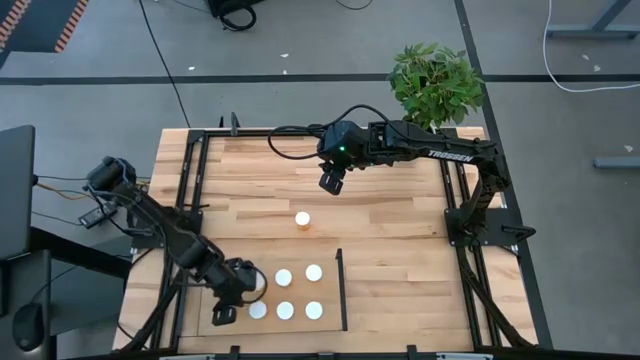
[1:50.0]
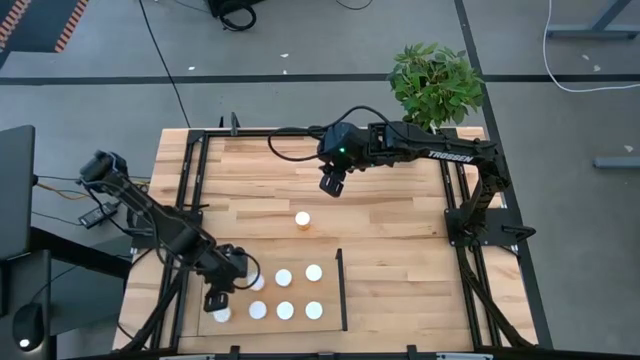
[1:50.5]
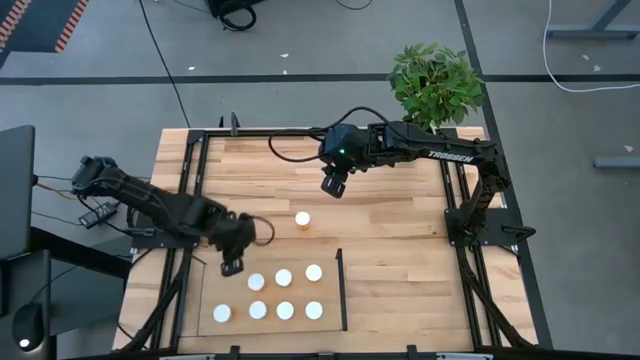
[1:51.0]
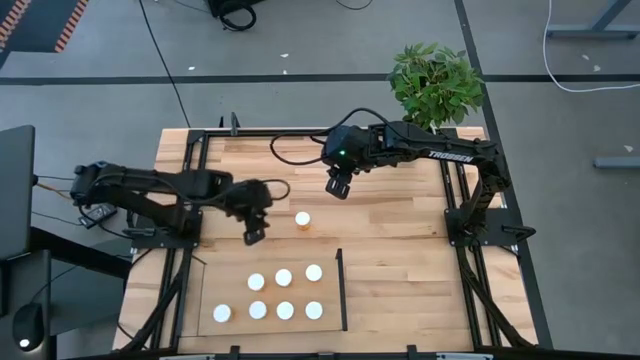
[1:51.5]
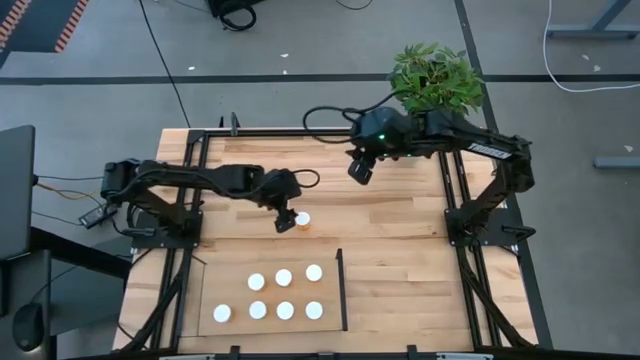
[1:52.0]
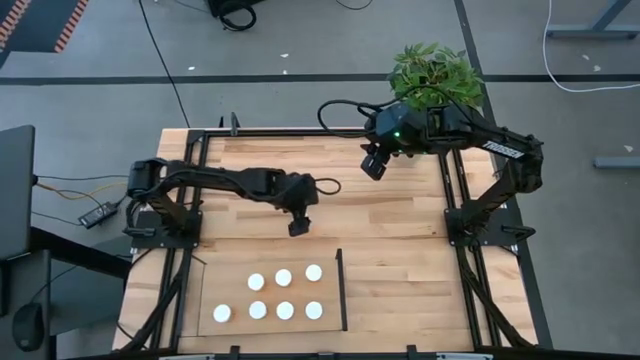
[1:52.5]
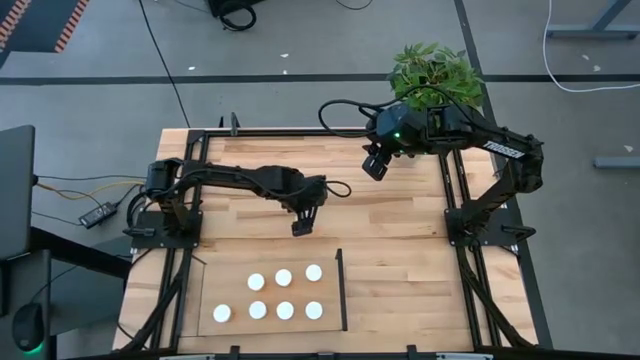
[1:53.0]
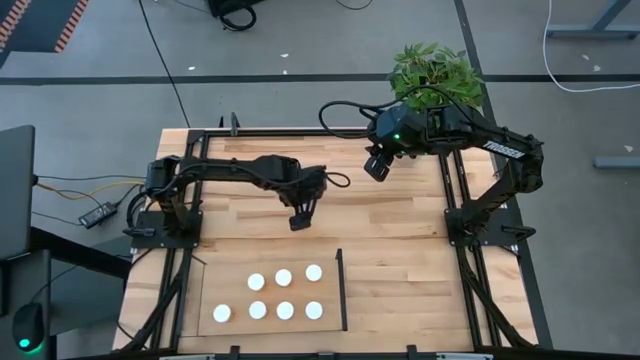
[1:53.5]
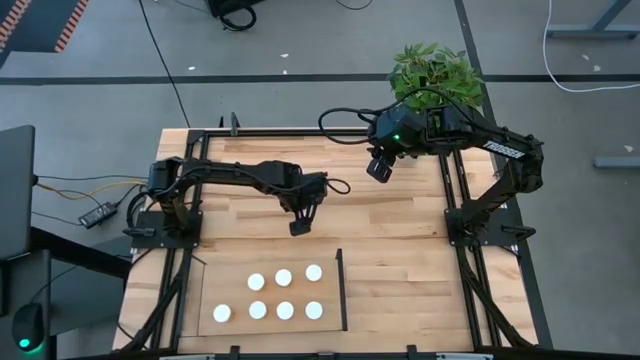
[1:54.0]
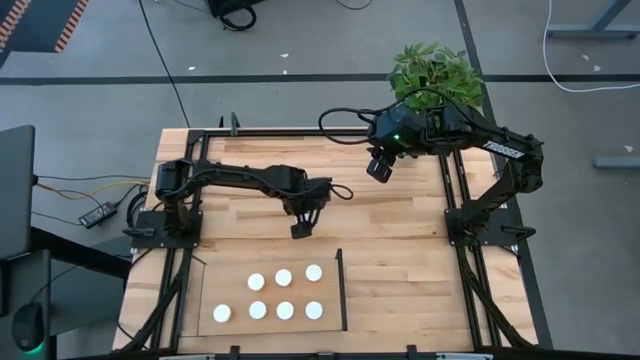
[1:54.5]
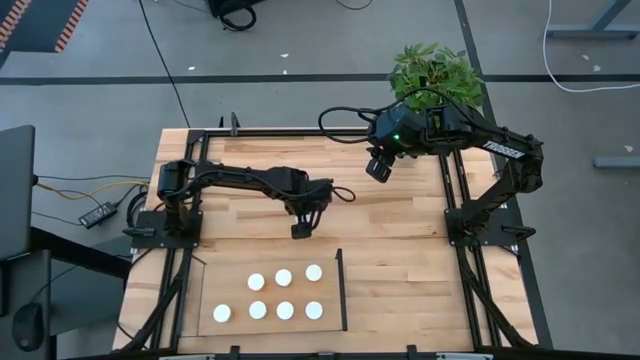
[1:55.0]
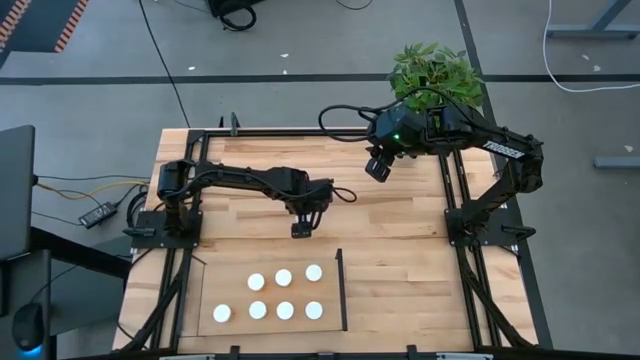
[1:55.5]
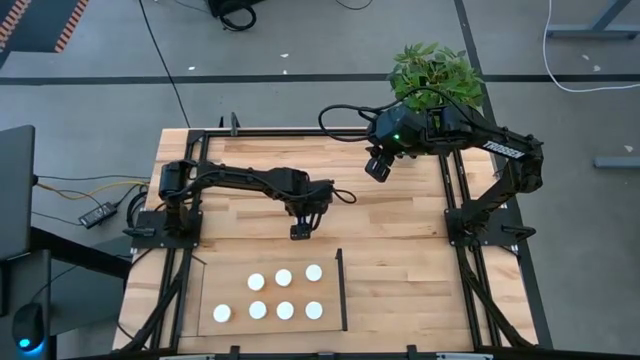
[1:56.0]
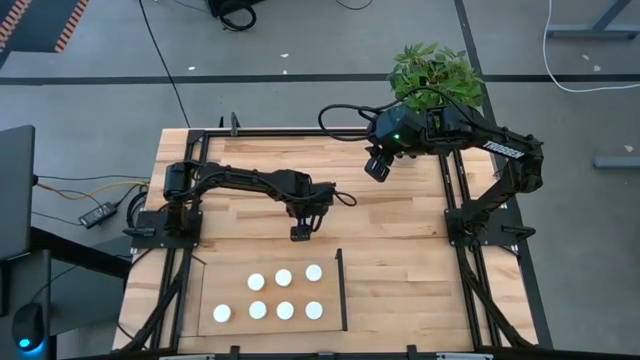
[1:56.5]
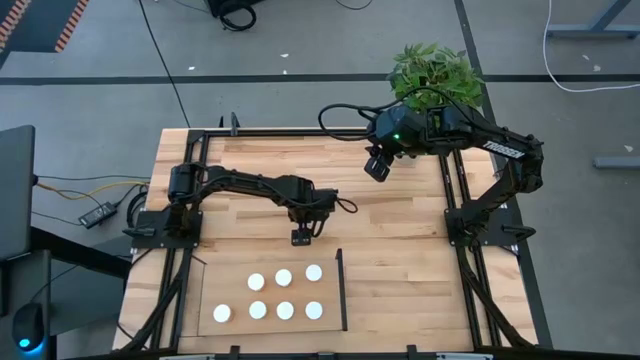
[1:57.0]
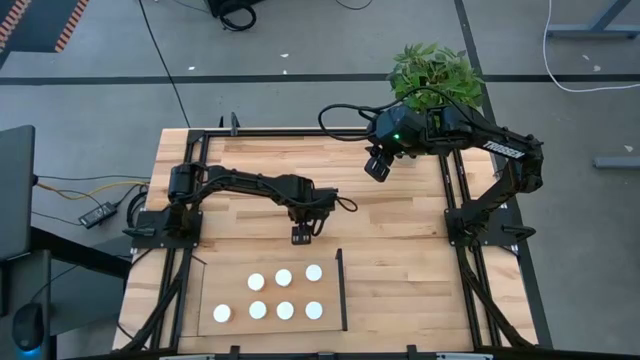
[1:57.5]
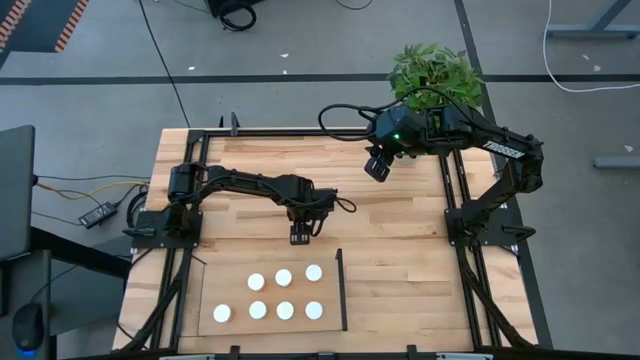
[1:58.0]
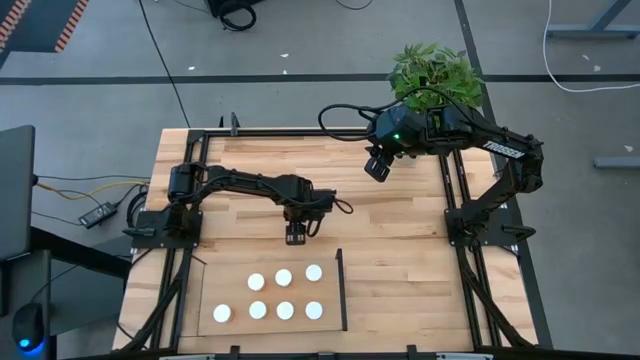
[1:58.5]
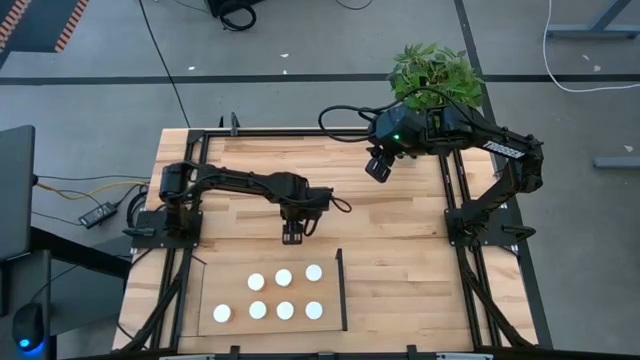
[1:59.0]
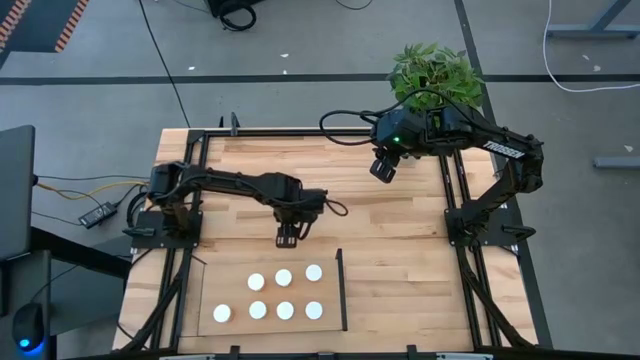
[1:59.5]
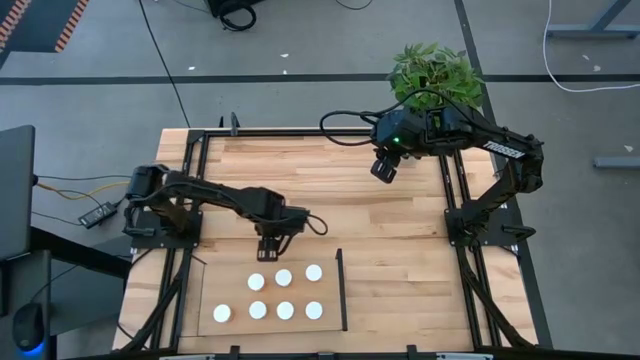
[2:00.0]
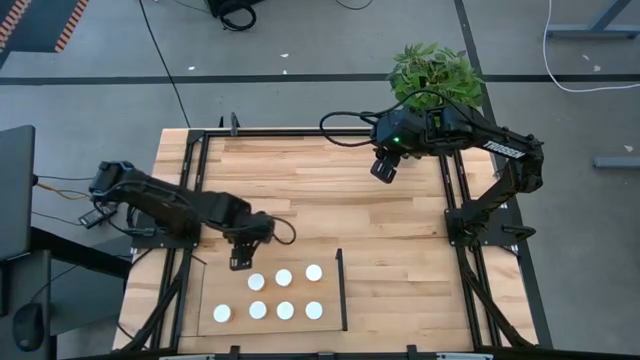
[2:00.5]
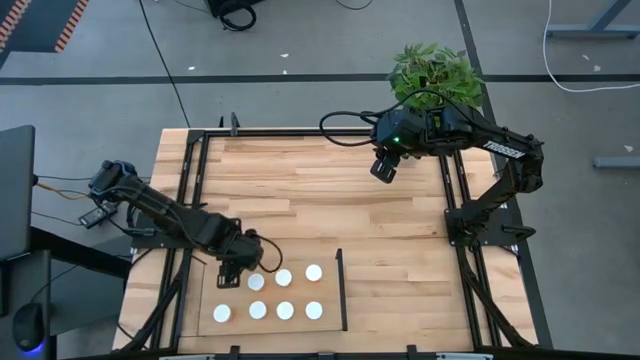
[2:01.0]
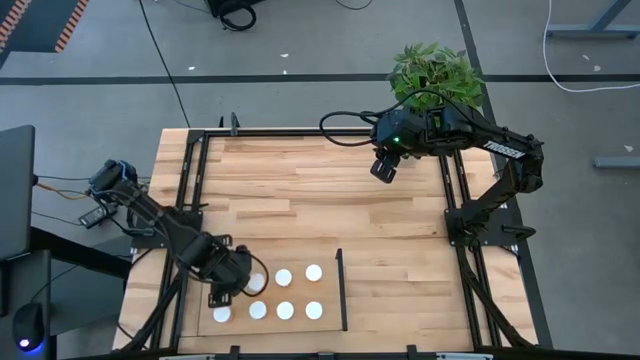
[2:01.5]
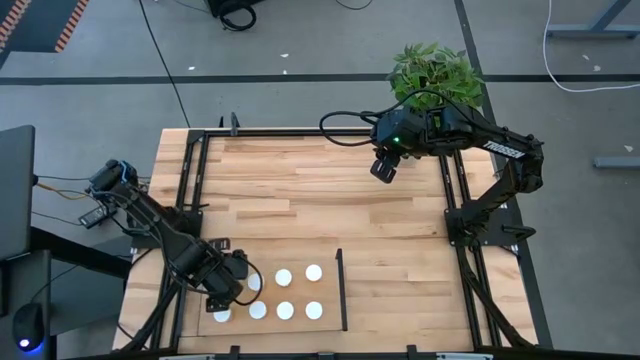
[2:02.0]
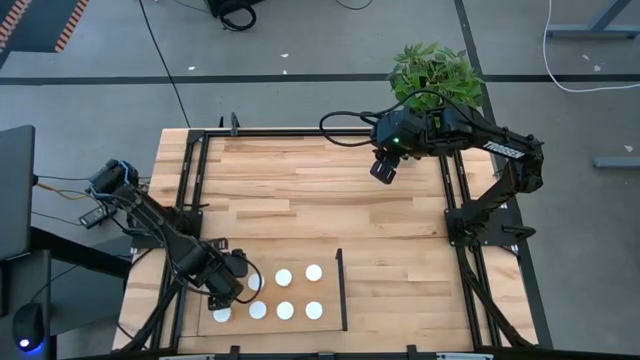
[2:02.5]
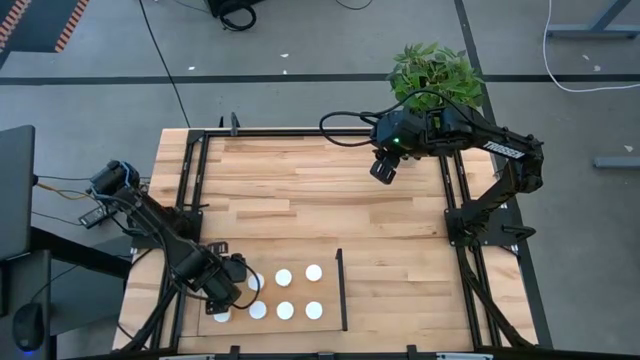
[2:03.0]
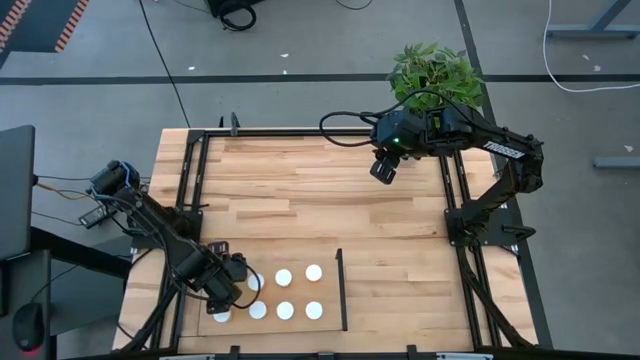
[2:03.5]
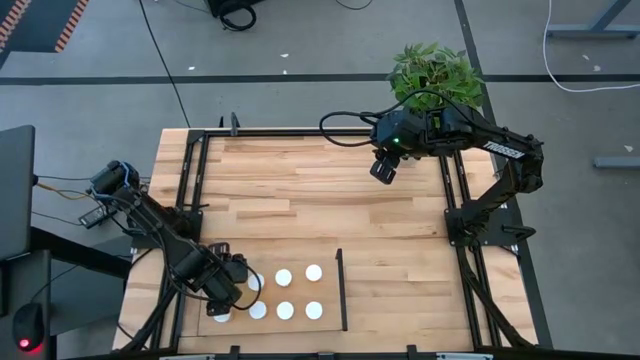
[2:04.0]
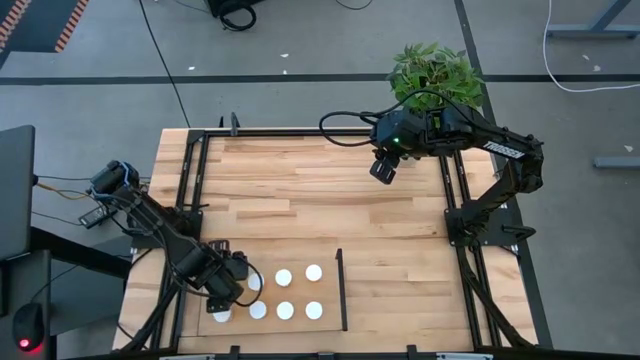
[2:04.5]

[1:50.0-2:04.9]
Task: Pick and place medicine bottles onto shelf by color
Align the orange pill bottle with the other orange pill bottle on the shelf

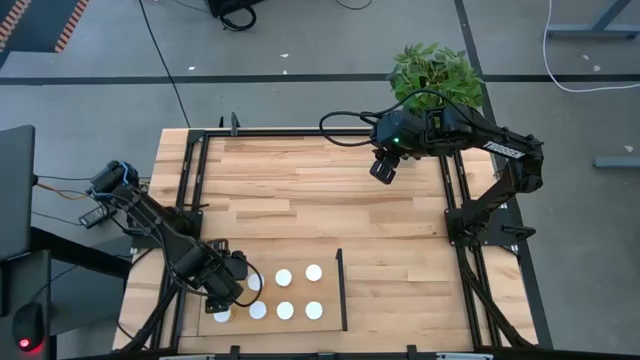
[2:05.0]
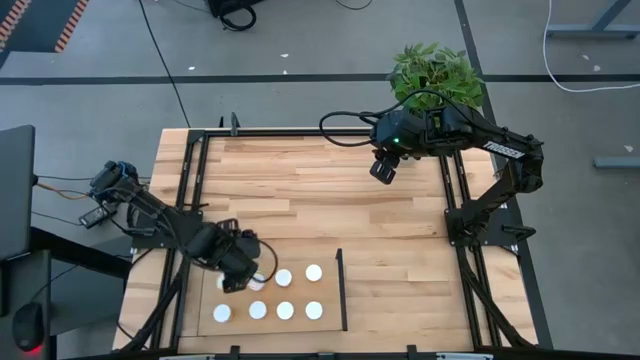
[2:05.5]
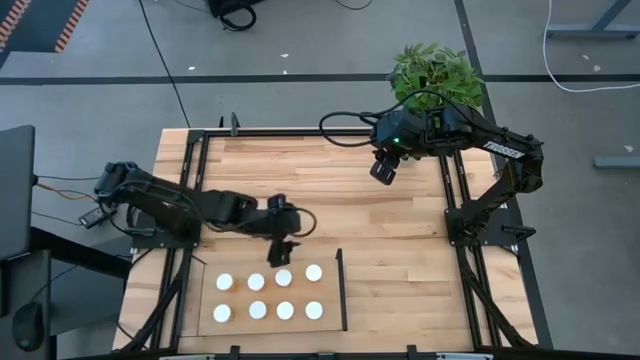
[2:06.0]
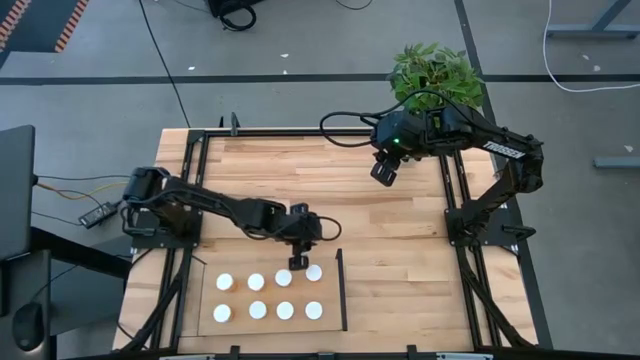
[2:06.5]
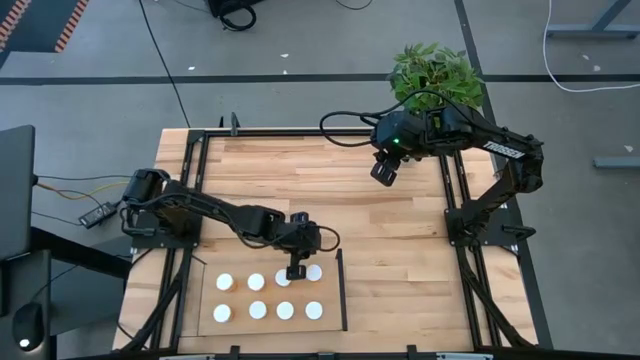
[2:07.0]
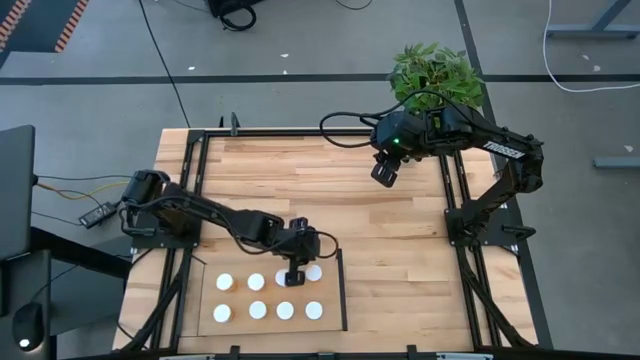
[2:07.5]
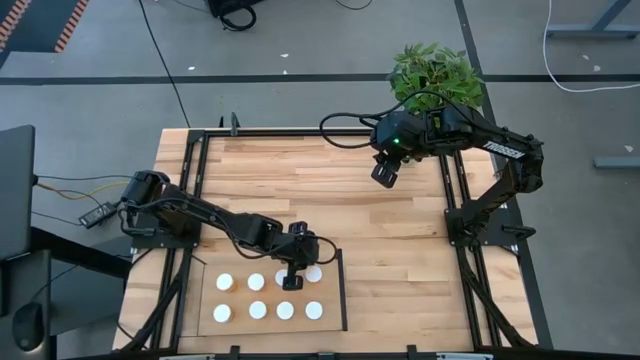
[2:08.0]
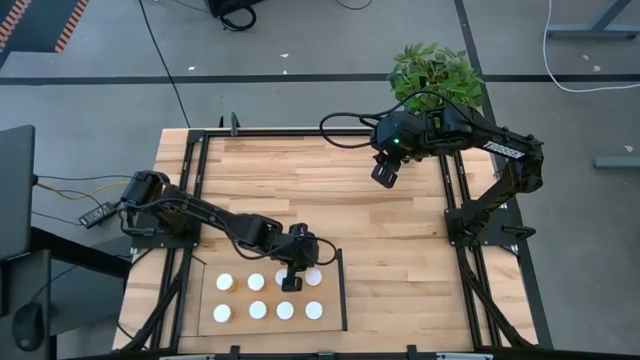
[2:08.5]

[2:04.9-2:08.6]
Adjust the orange pill bottle on the shelf

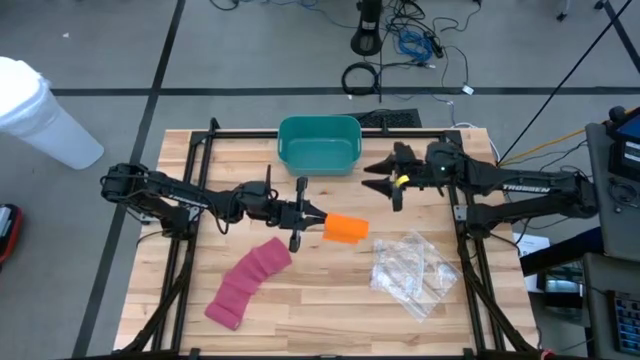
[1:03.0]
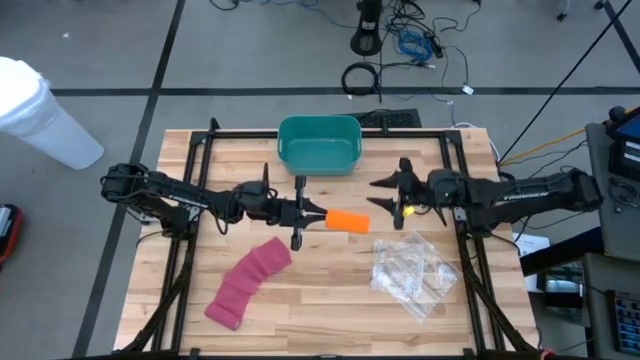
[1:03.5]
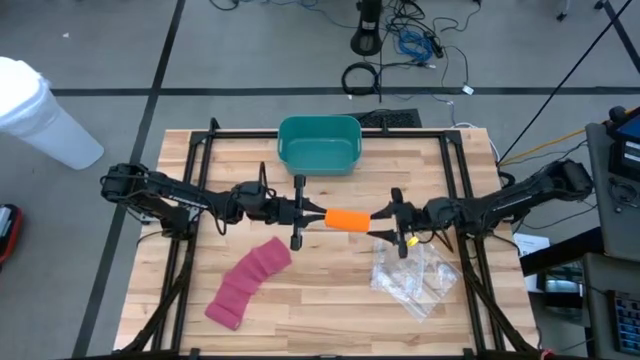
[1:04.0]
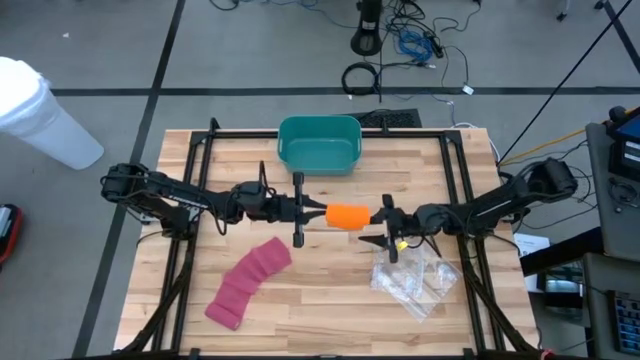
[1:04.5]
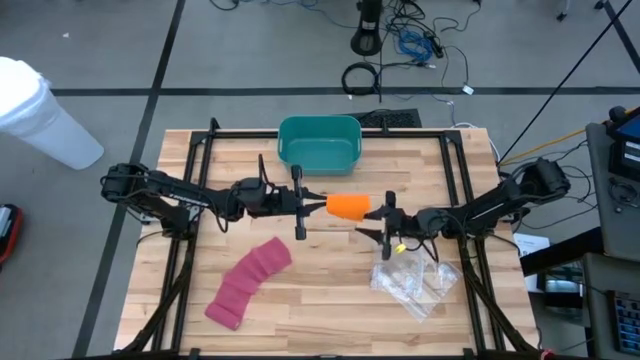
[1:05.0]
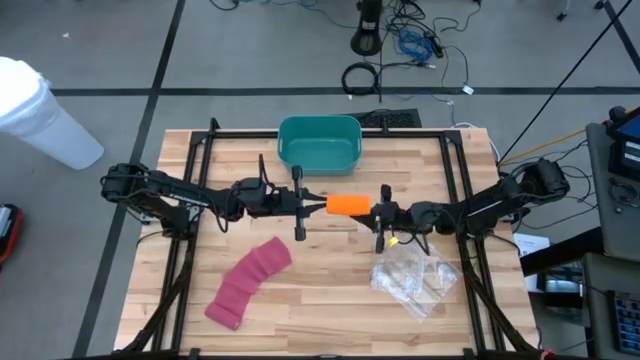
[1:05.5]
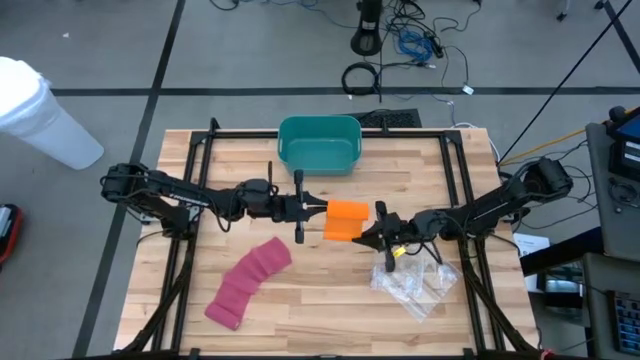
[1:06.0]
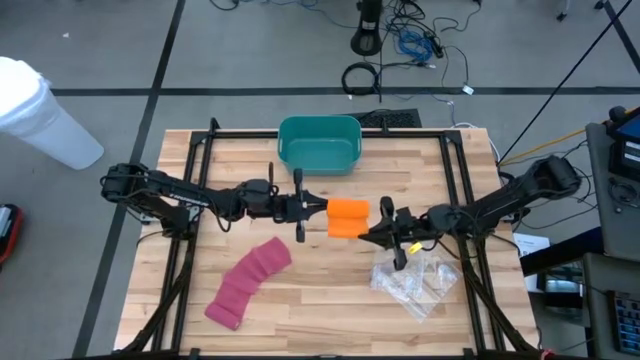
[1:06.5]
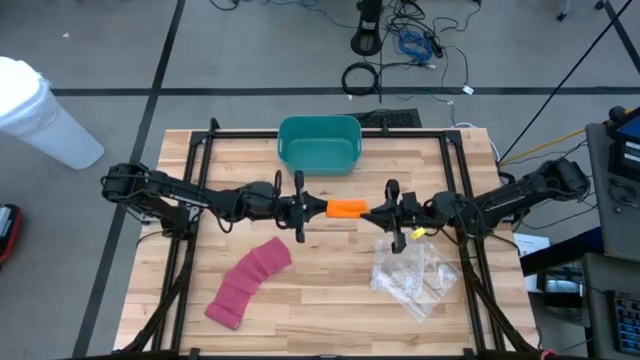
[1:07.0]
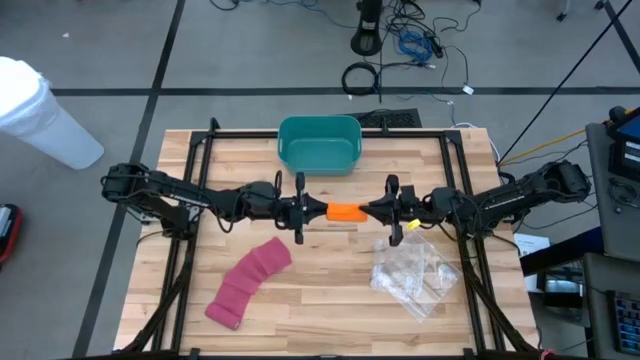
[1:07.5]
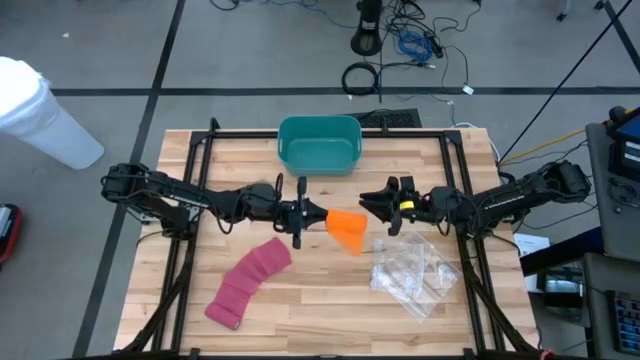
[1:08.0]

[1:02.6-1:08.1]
Task: Roll bandage
Roll the orange bandage
